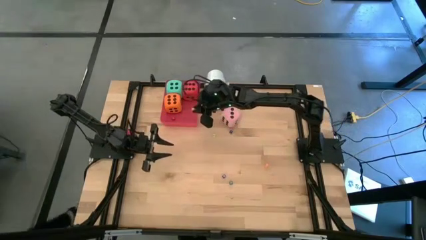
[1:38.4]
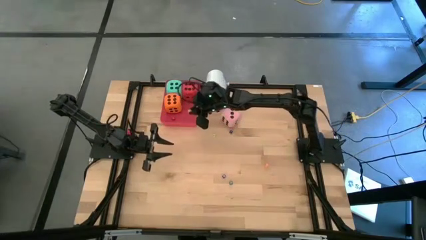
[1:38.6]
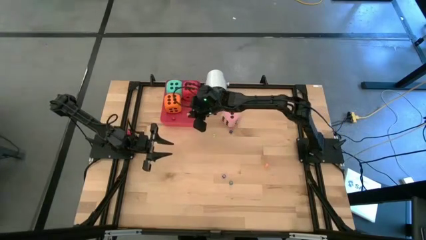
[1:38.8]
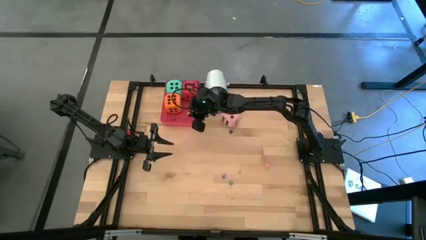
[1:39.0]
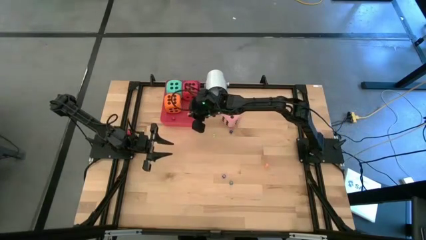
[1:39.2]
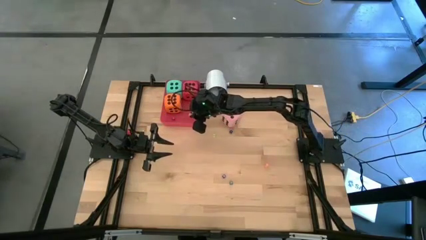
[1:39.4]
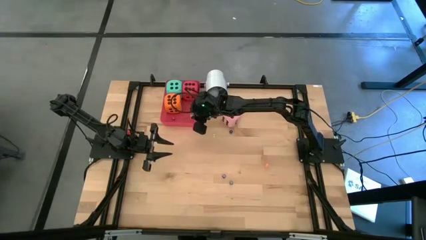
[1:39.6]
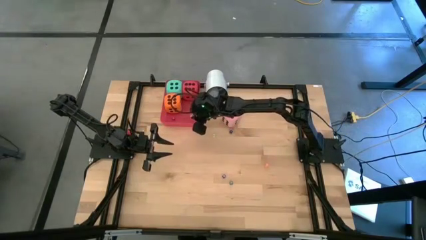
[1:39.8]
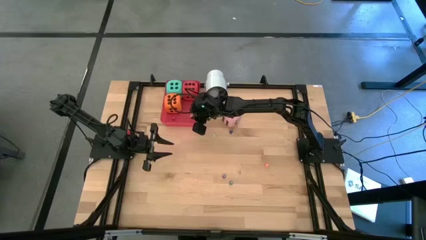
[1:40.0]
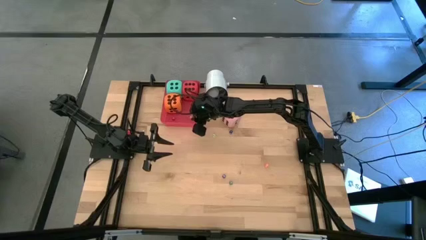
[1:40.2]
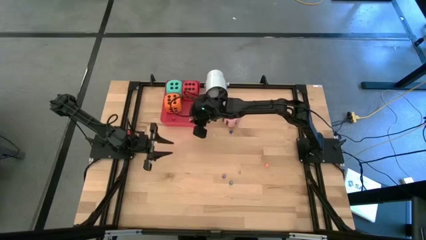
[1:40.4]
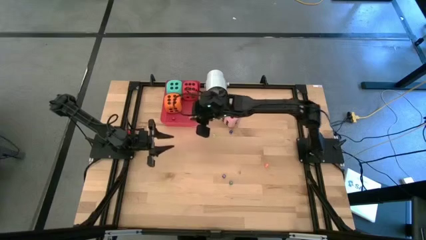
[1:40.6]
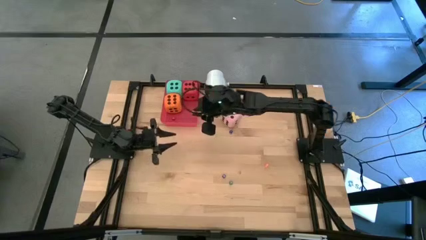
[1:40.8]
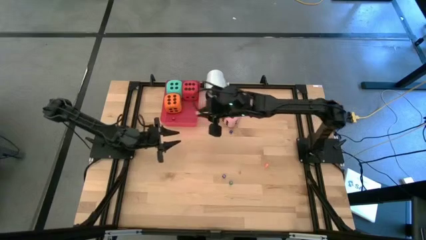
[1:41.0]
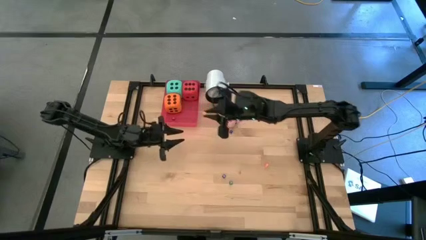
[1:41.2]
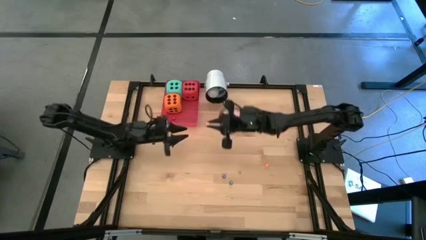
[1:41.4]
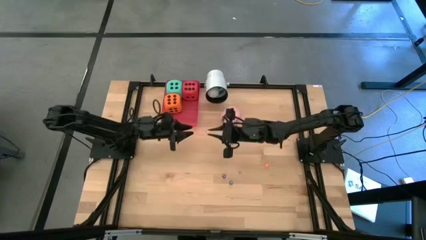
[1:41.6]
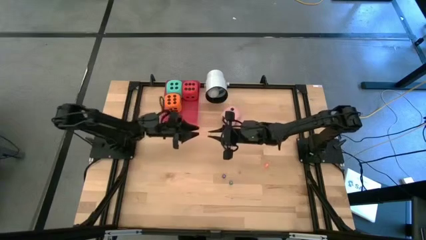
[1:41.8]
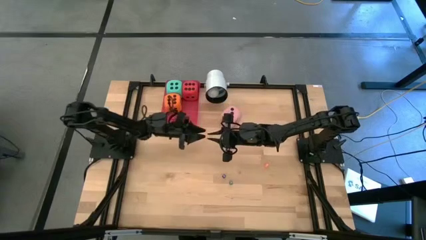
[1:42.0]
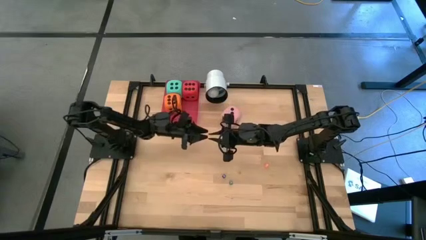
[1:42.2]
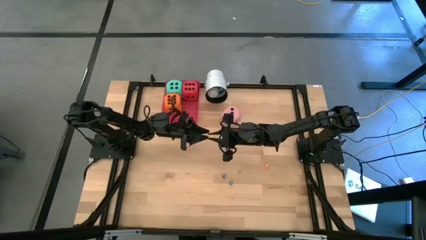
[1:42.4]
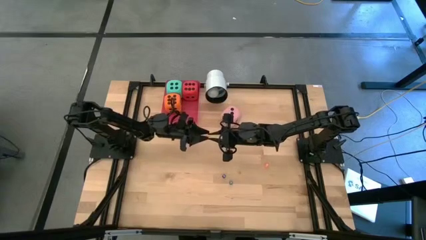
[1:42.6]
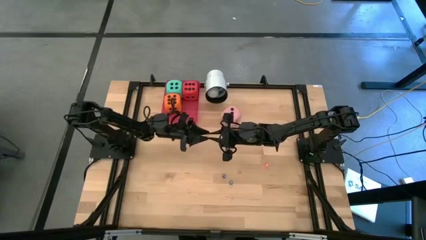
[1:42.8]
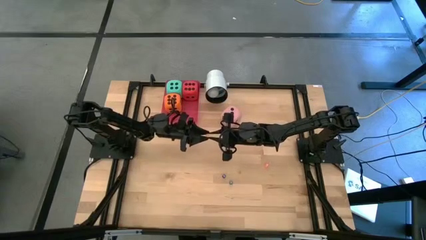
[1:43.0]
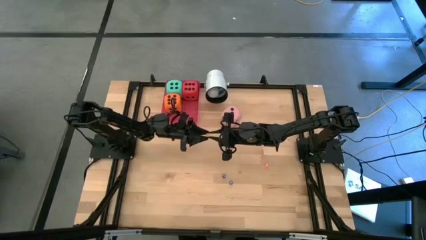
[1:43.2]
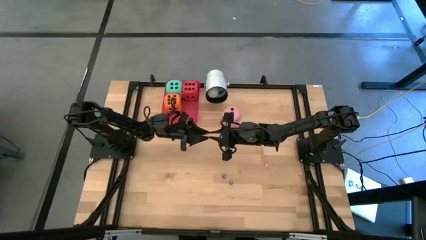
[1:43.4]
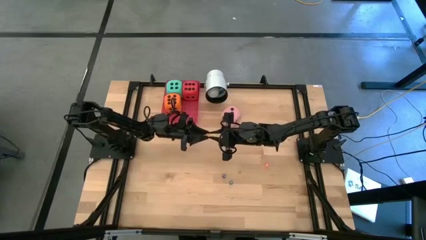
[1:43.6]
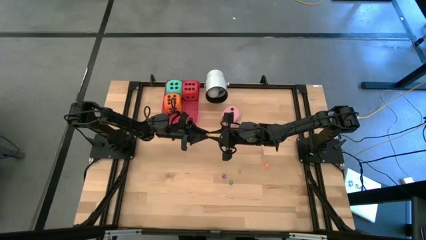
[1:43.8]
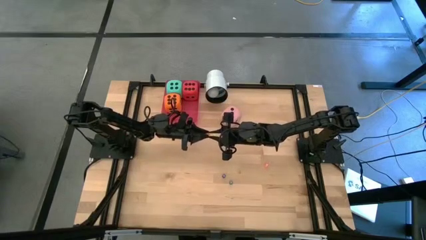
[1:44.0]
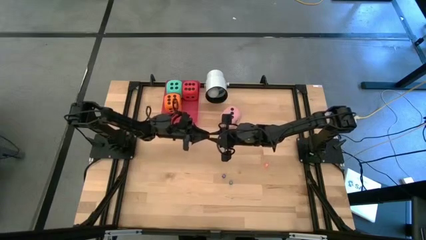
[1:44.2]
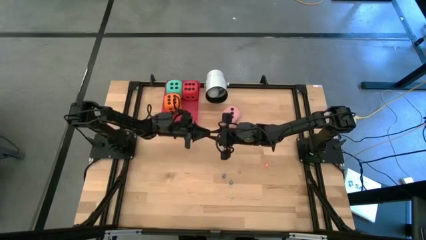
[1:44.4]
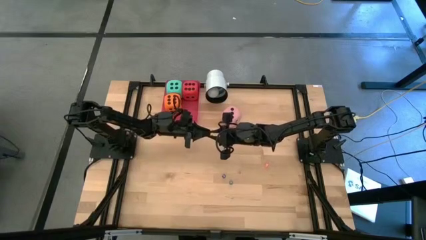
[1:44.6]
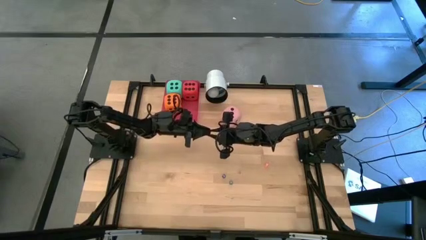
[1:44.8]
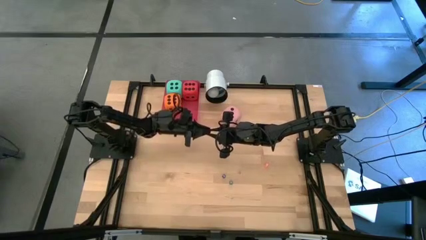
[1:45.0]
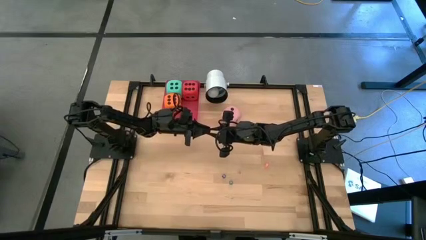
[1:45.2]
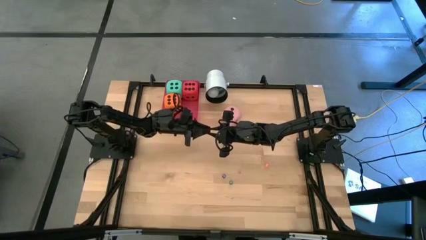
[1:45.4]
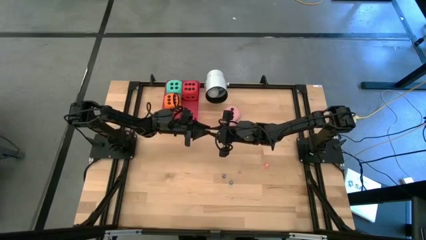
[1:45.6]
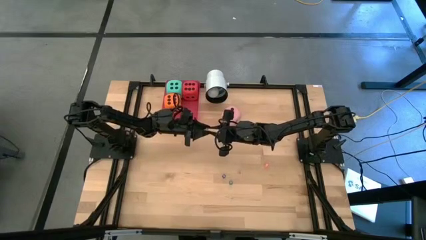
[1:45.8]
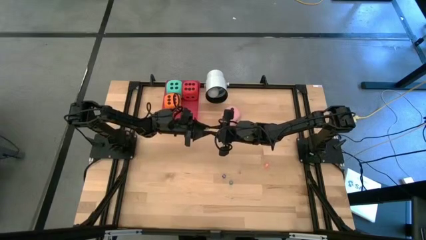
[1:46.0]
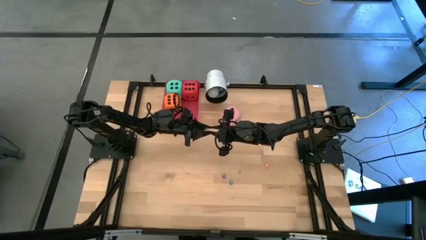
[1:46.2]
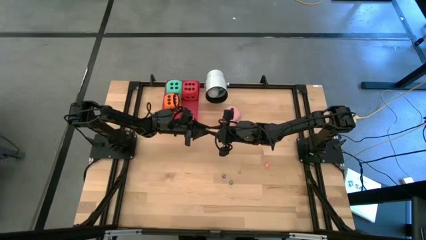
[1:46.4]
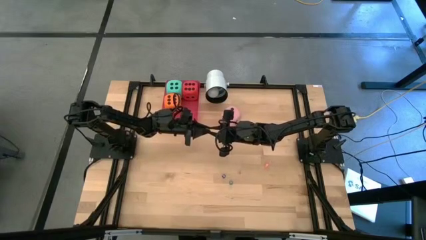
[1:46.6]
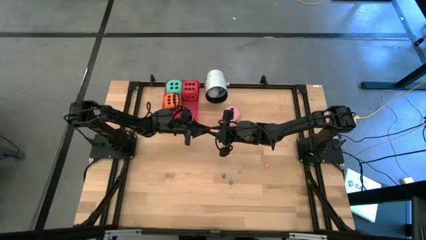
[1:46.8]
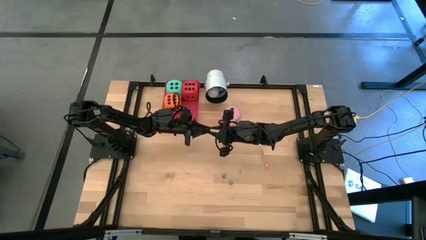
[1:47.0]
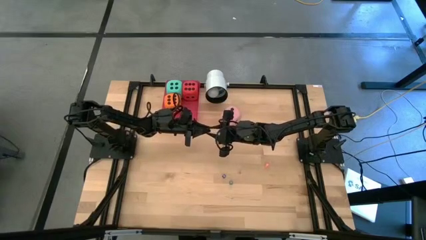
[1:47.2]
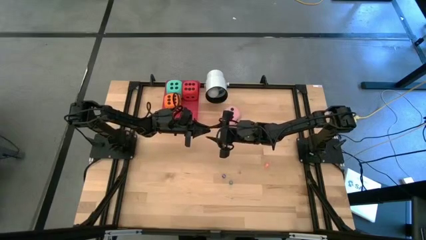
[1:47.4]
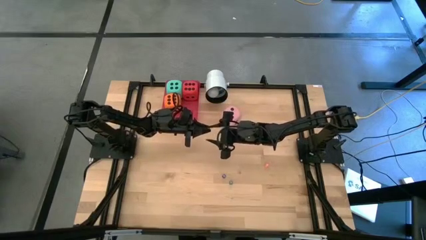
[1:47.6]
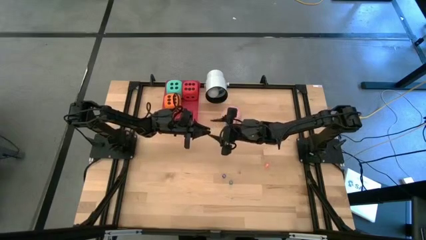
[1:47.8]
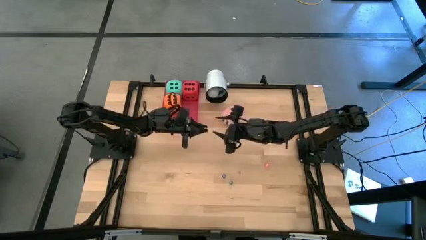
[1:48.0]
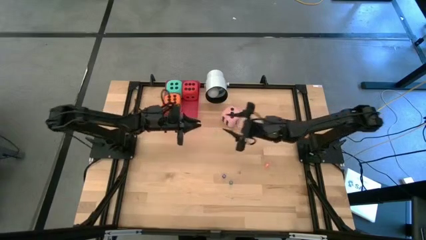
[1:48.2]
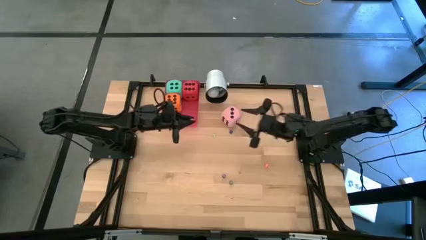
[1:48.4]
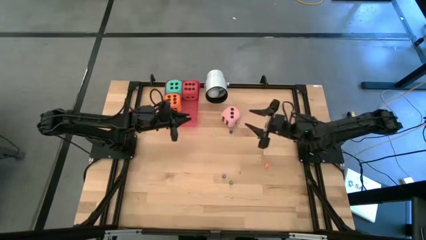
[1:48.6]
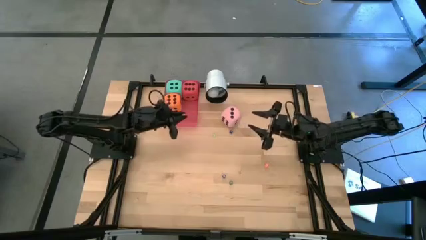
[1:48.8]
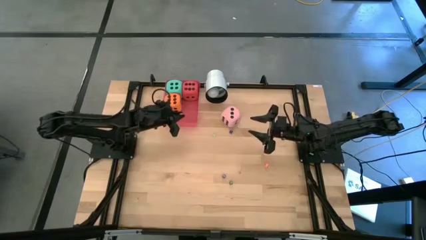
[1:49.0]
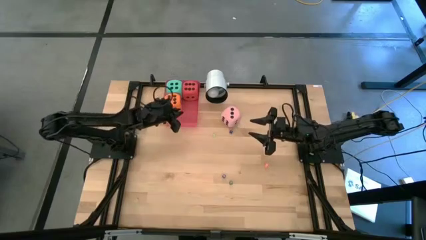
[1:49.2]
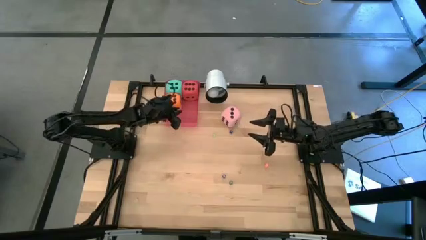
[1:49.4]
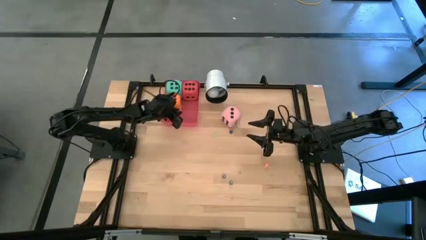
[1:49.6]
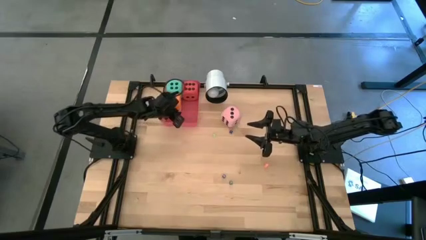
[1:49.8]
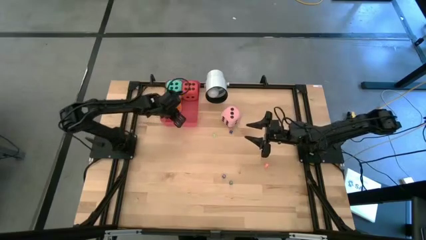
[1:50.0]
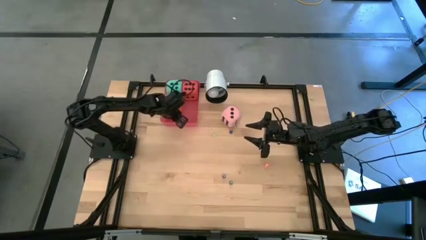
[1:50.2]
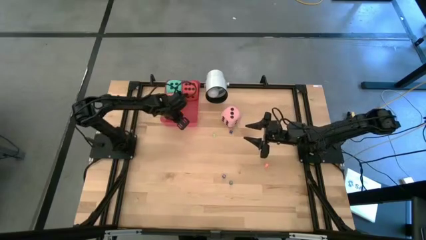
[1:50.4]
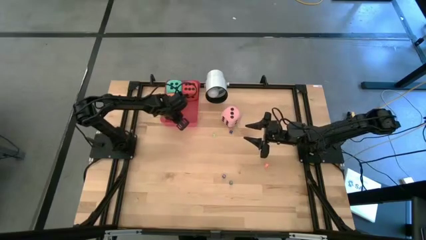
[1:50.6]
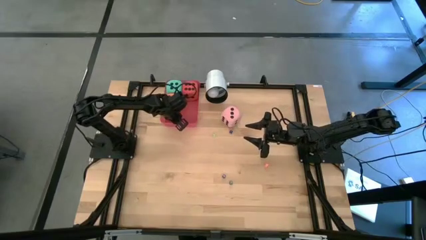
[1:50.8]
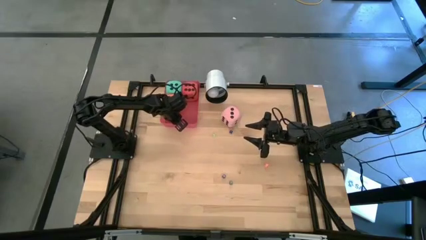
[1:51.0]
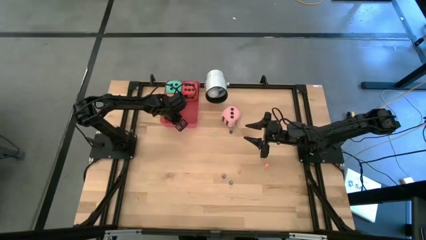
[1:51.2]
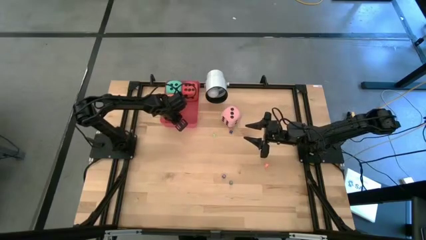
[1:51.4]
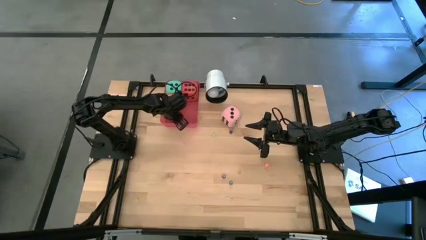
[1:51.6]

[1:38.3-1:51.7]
Task: Pick & Place Dice
Put the small yellow dice into the red bin

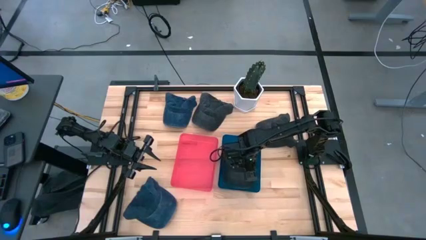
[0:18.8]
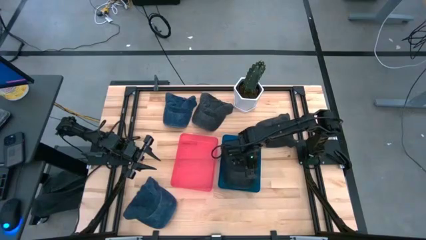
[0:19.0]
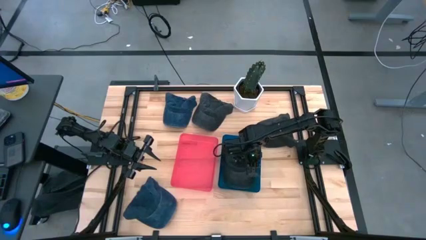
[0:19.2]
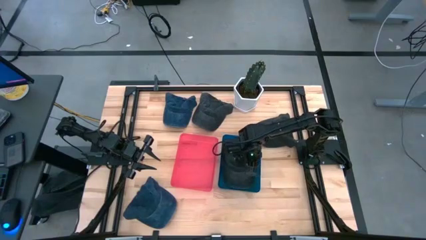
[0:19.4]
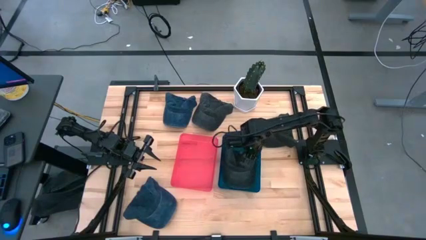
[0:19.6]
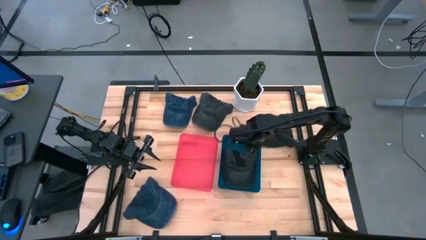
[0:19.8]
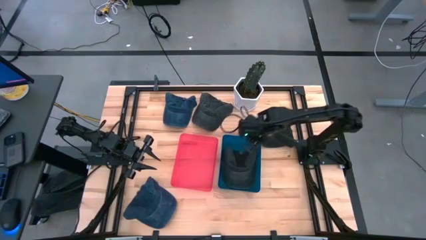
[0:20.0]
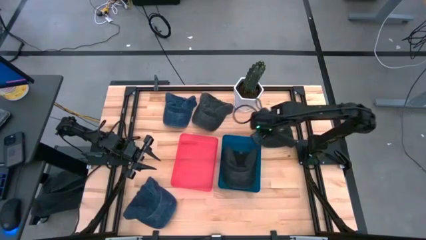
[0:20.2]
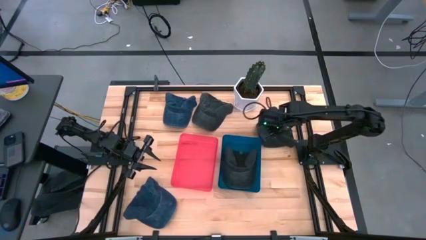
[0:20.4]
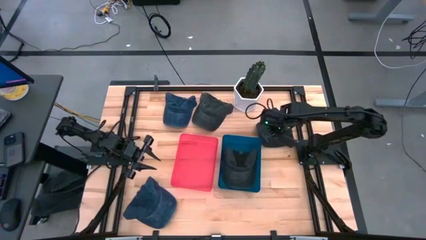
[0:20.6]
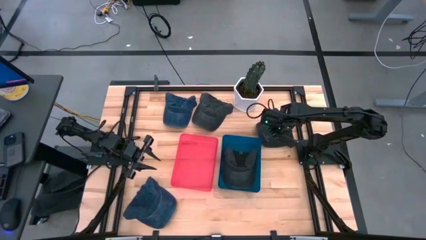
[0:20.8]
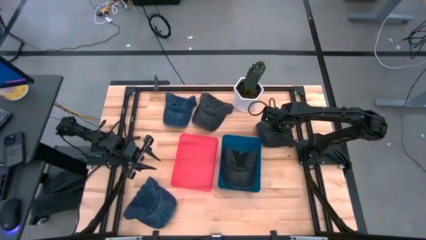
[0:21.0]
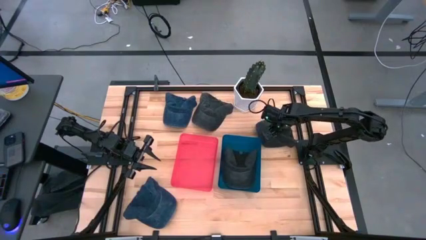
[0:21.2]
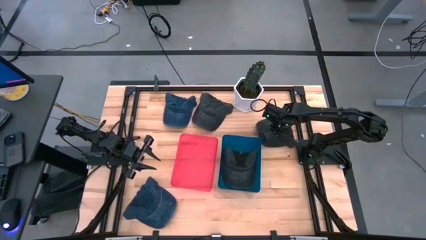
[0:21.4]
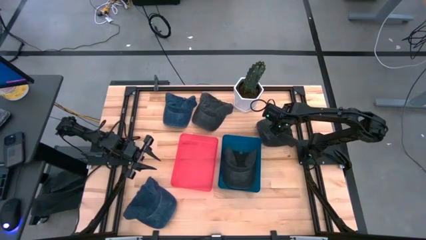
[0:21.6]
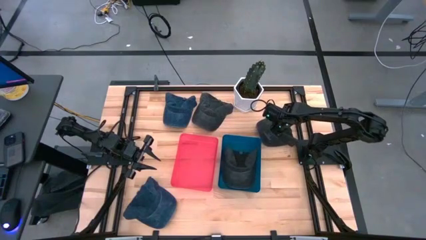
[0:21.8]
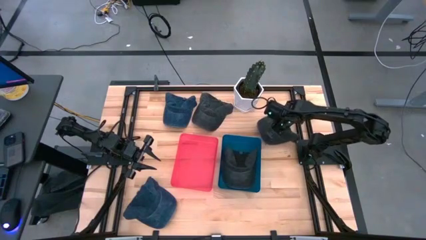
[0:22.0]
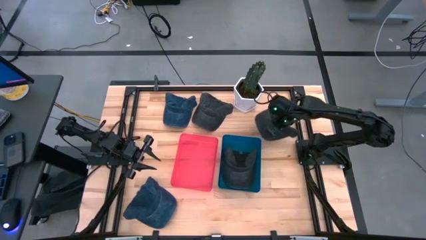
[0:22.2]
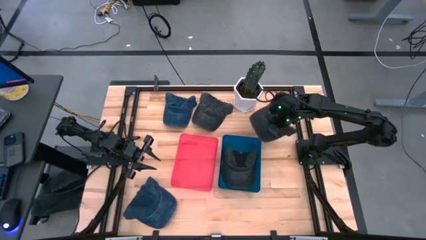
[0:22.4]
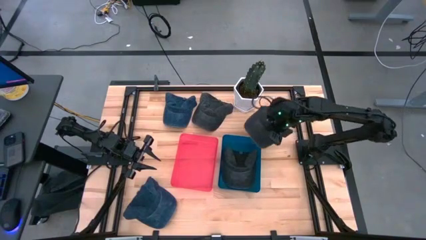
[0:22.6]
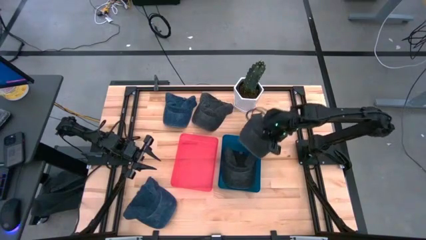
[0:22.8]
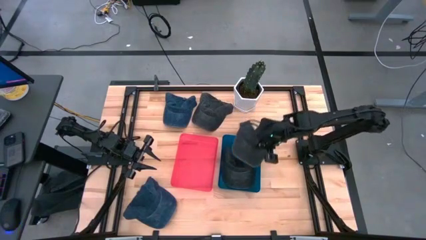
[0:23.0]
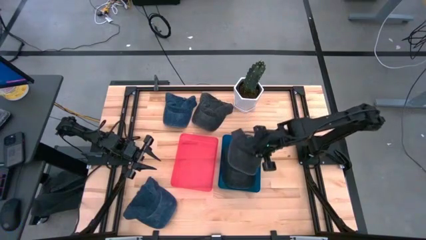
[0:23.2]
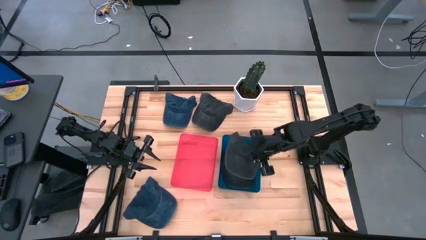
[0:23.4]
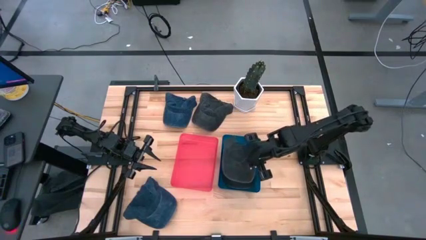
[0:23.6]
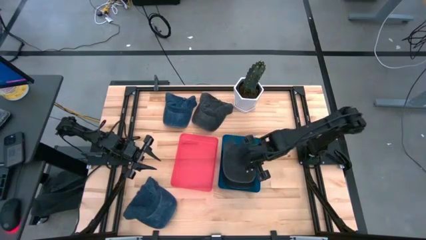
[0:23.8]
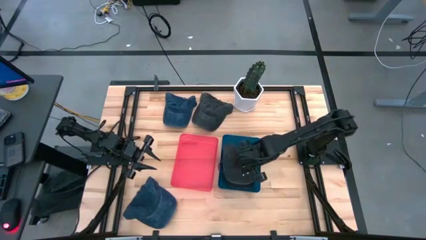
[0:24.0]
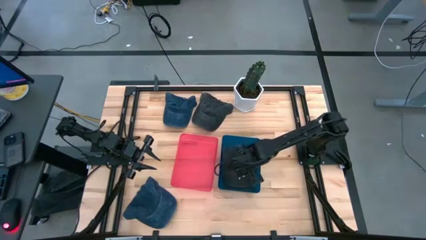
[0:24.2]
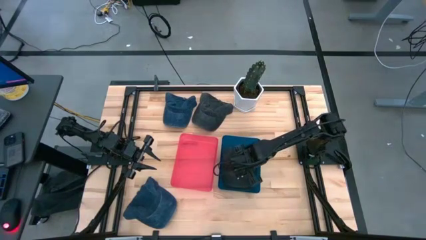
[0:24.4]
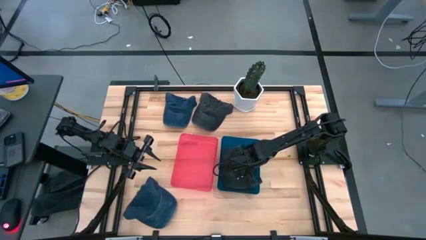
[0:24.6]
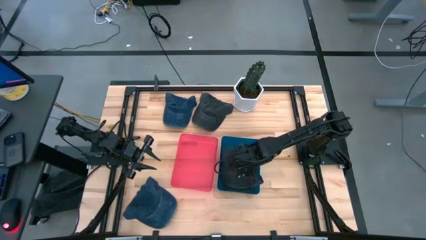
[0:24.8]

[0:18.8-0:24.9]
Task: Pick & Place hat
Put the right black cap into the blue bin
